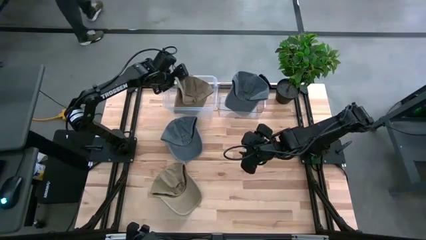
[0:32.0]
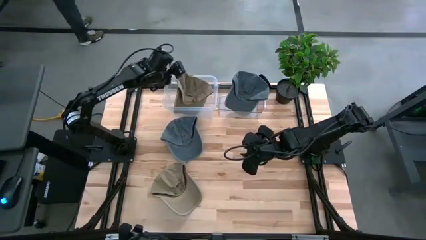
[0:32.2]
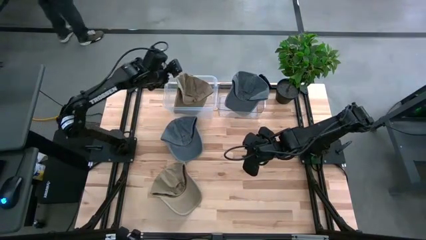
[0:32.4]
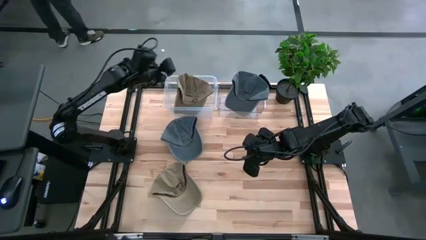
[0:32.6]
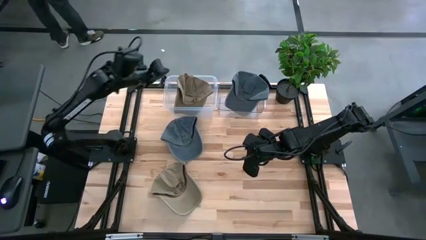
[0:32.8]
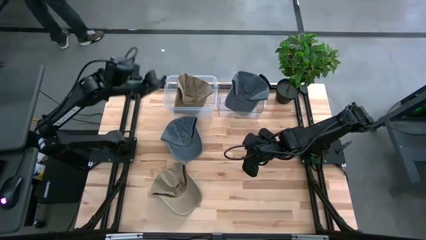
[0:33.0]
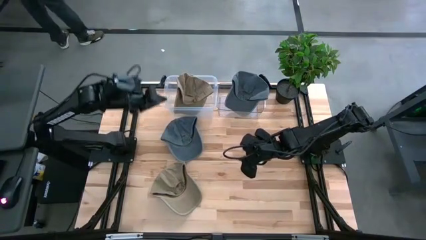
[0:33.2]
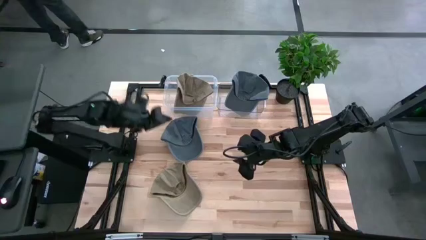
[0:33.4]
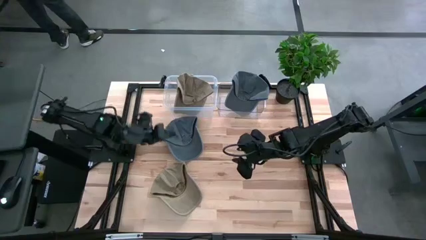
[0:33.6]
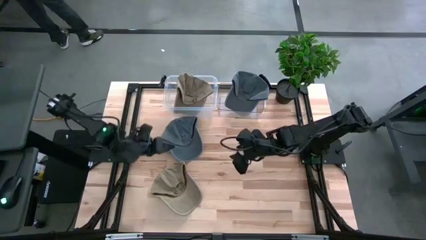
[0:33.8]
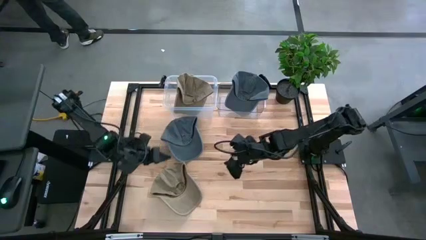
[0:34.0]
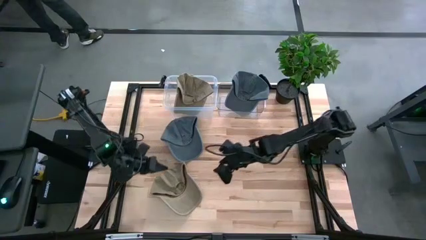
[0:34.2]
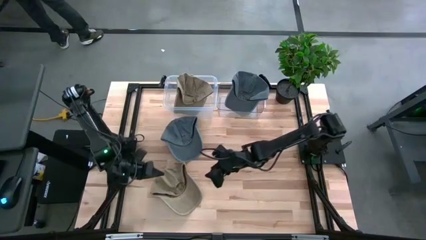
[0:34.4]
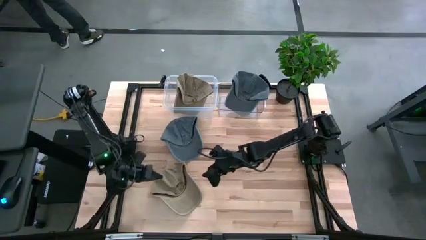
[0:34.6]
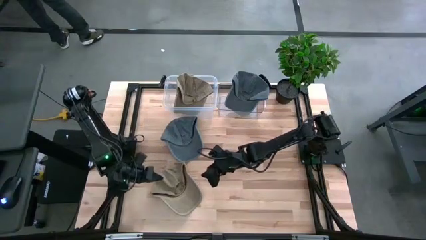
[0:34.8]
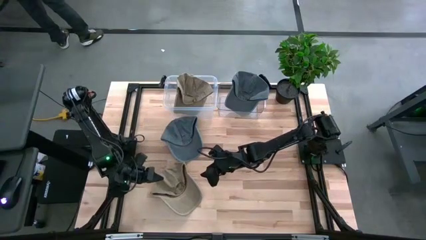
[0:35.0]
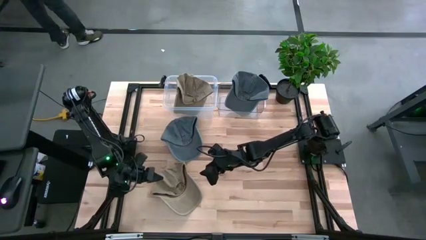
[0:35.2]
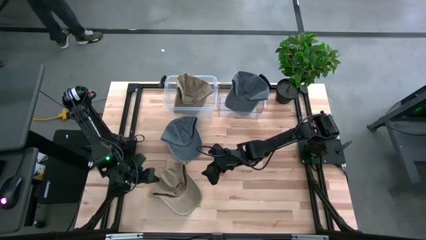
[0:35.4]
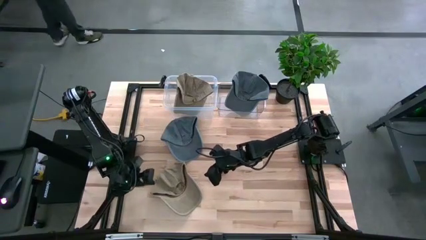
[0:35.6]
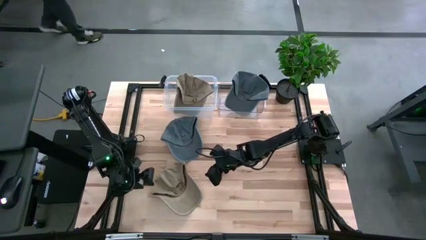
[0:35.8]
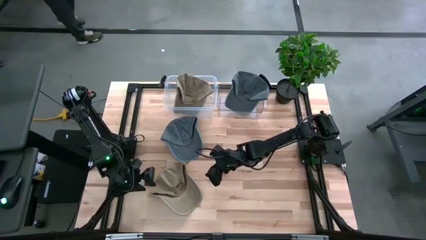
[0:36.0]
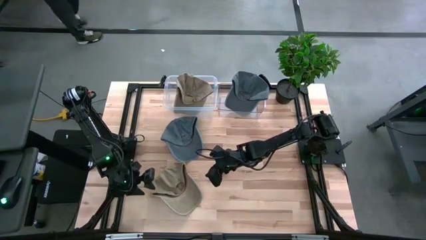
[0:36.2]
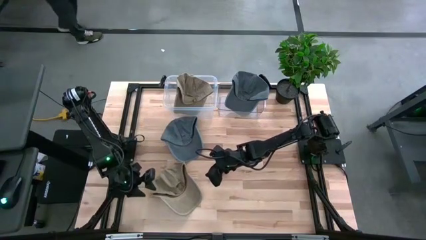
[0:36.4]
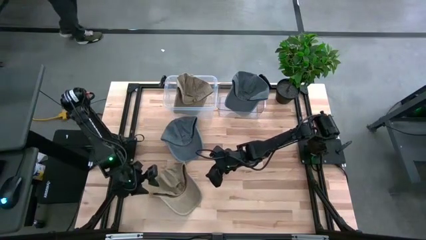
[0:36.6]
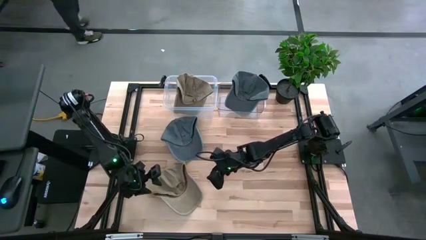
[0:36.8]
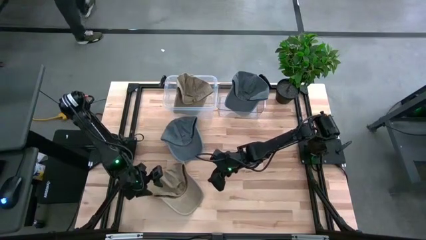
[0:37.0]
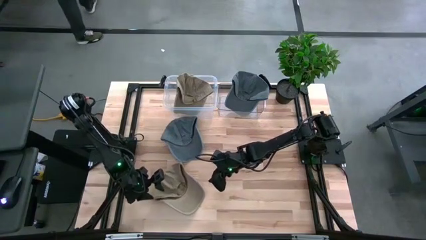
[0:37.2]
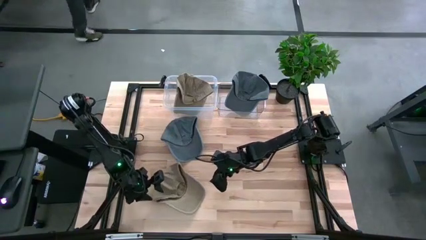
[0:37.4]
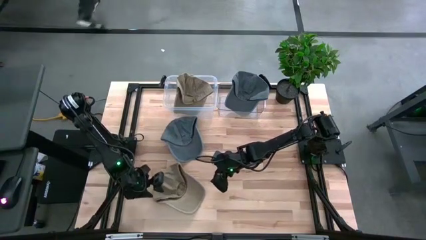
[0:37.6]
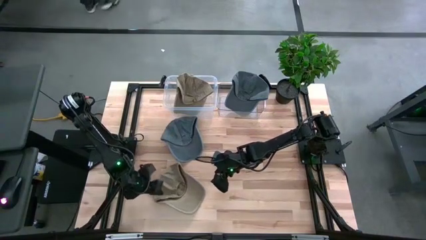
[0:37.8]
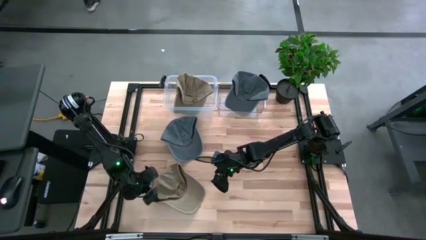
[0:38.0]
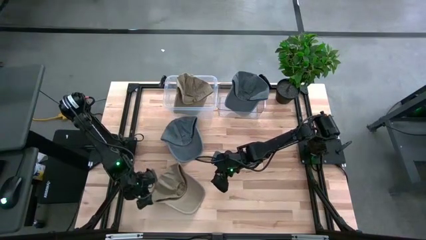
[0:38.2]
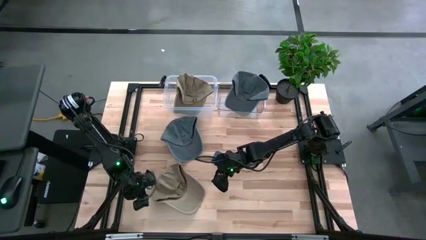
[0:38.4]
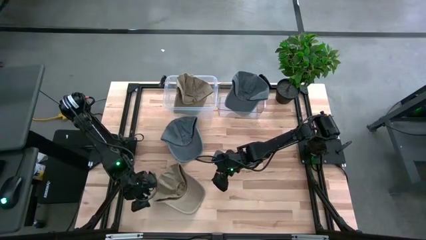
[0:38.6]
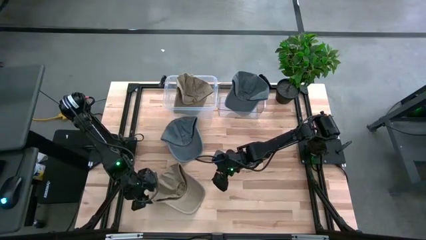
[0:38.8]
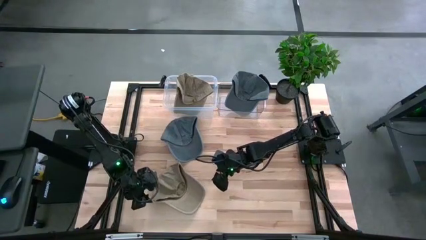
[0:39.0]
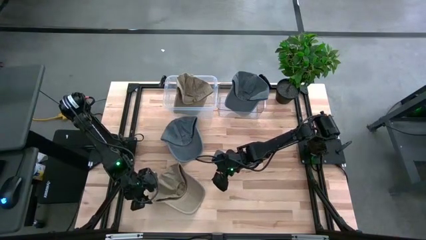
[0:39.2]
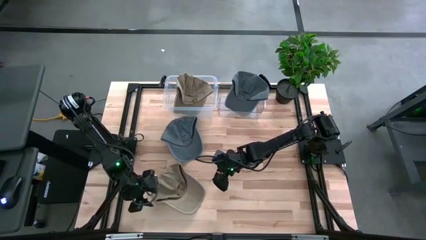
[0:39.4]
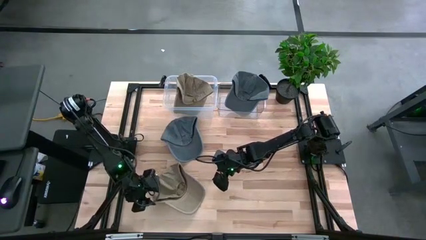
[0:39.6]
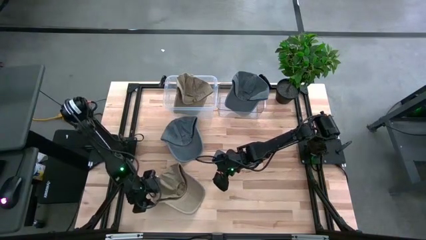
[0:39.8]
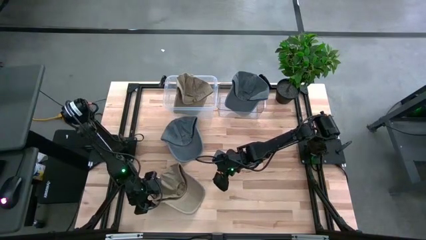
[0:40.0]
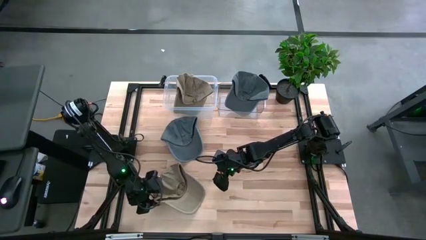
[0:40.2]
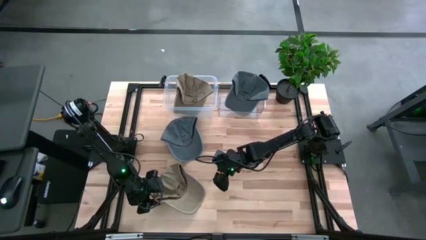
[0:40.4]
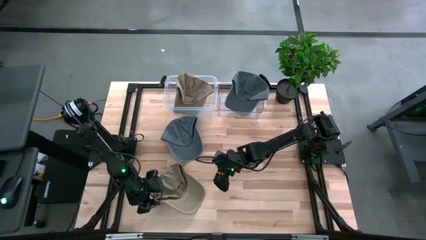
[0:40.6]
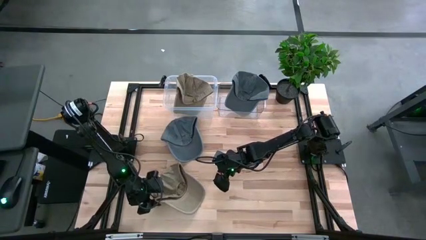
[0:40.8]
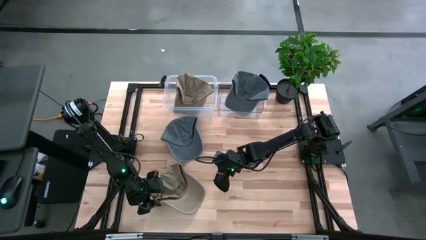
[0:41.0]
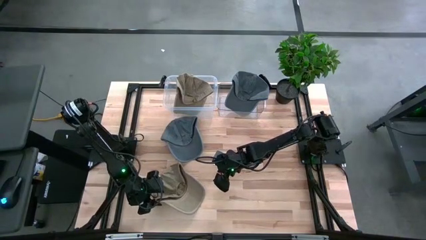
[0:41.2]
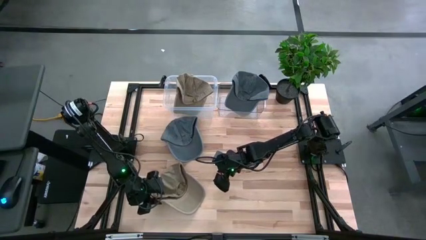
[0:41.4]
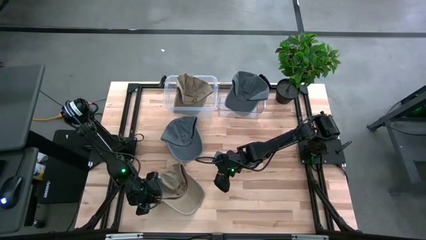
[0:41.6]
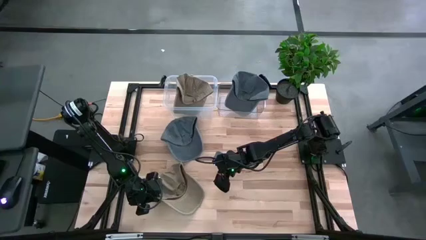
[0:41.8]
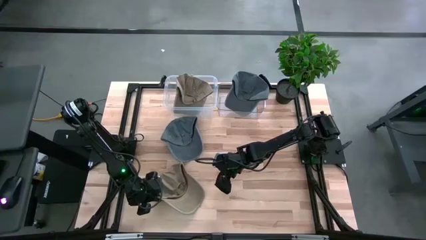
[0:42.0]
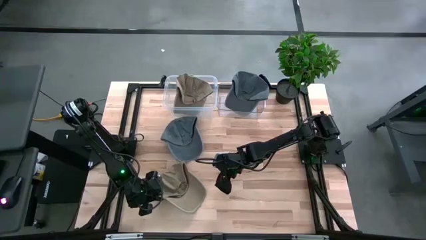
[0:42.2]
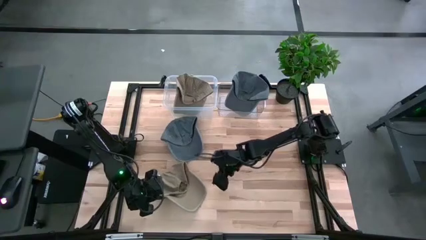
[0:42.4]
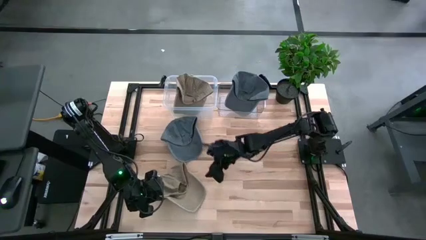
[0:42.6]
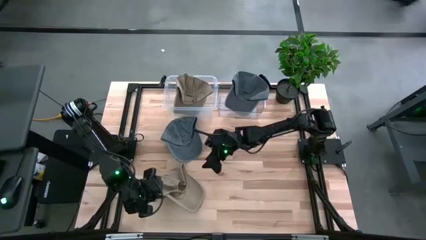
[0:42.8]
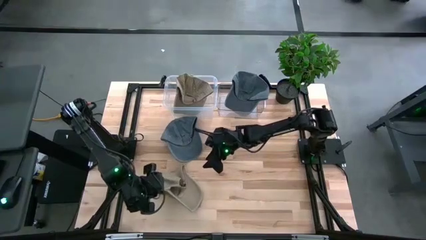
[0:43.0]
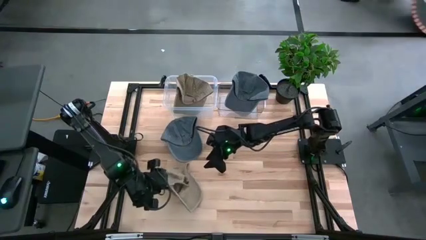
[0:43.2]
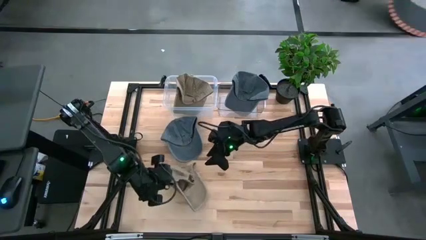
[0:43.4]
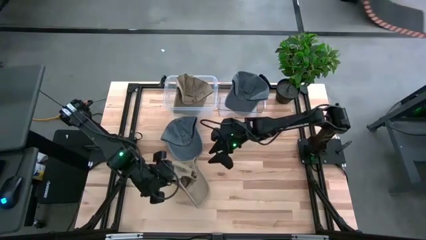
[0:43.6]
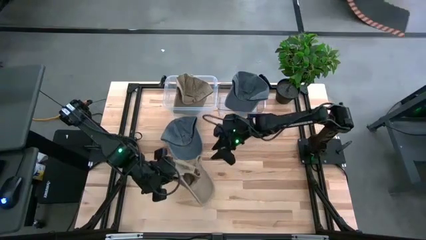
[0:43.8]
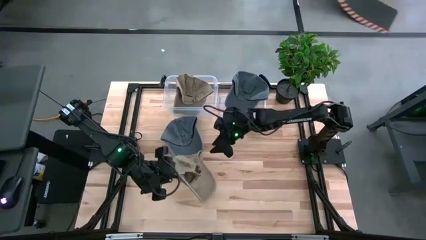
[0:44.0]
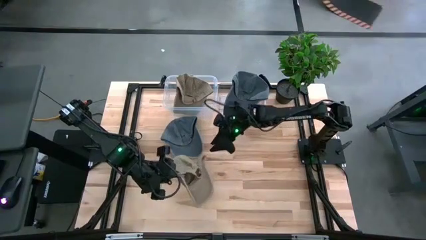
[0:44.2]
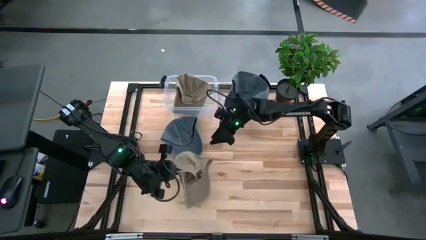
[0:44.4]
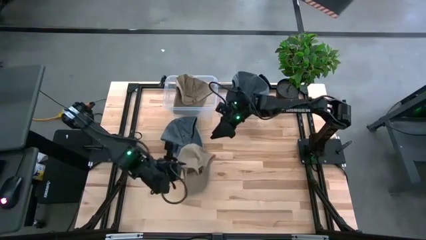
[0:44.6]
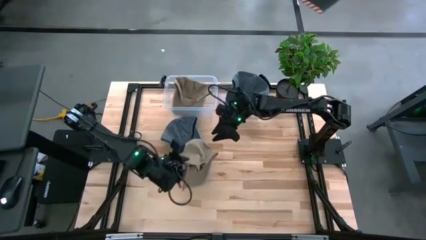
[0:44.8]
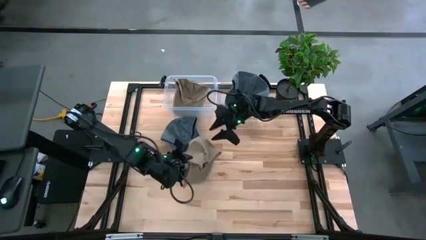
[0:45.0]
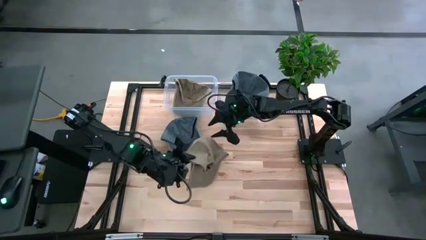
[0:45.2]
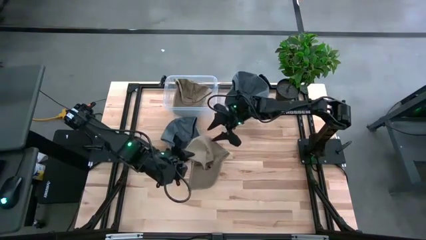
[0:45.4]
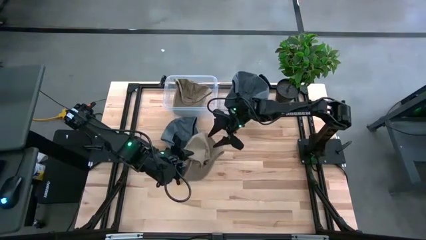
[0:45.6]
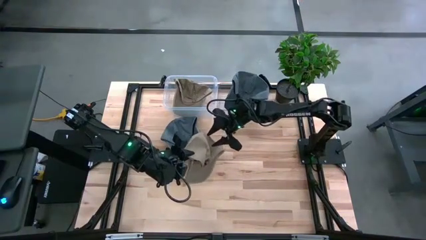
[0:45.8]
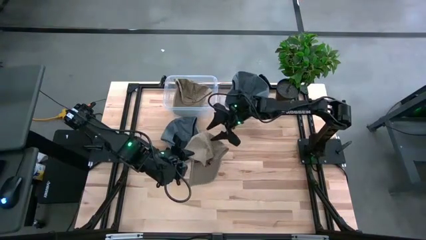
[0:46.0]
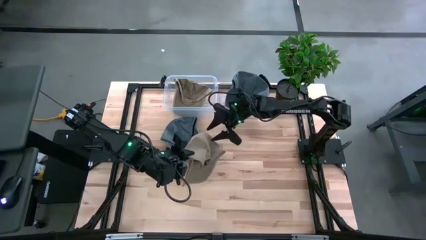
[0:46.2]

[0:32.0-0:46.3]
Task: Pick & Place hat
Put the brown cap into the white bin
